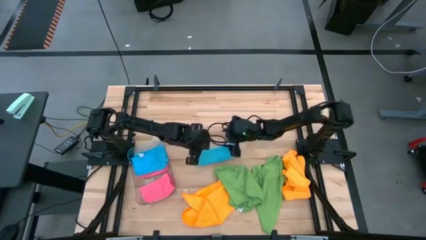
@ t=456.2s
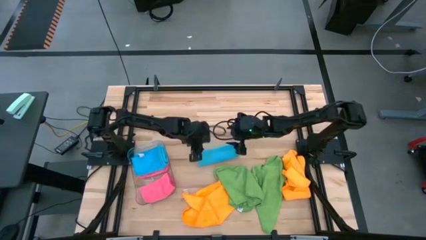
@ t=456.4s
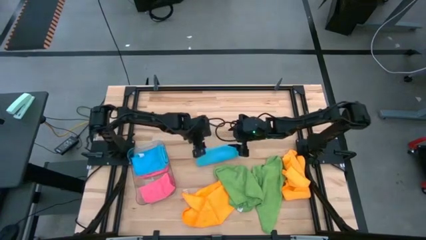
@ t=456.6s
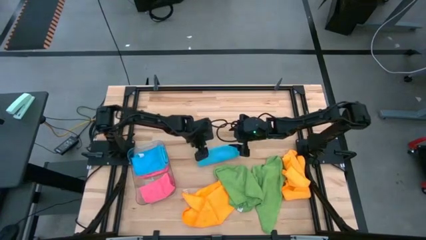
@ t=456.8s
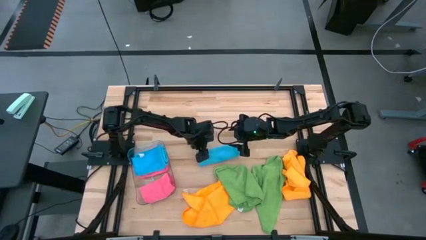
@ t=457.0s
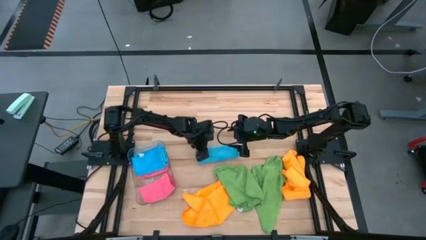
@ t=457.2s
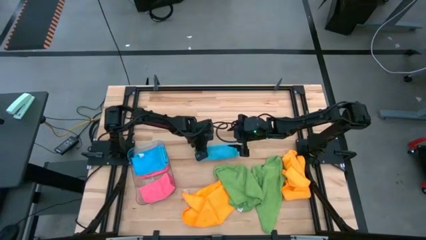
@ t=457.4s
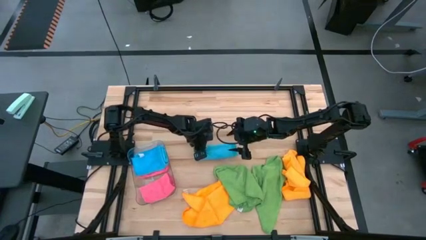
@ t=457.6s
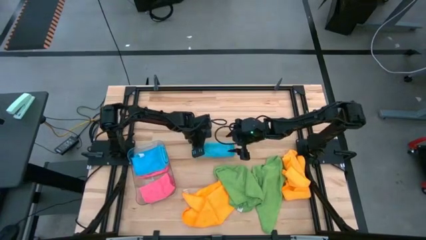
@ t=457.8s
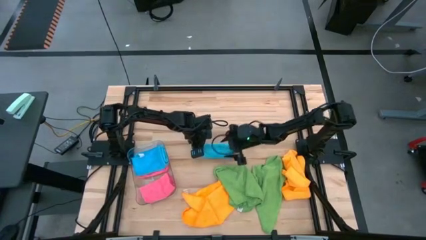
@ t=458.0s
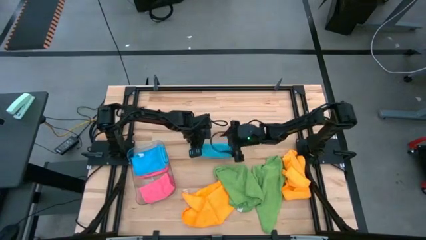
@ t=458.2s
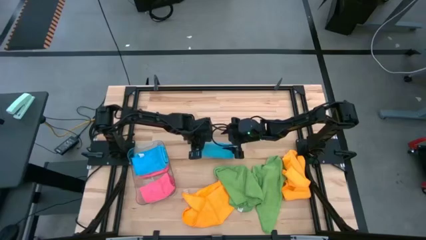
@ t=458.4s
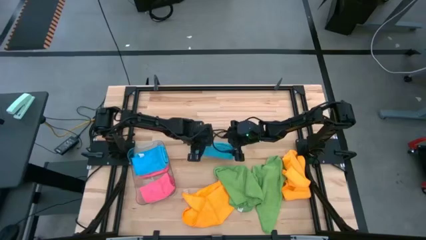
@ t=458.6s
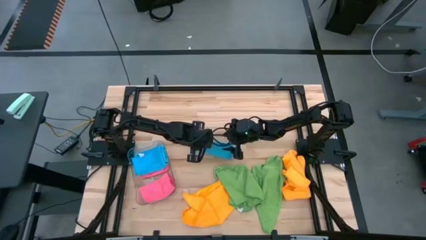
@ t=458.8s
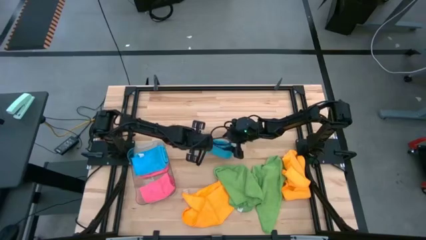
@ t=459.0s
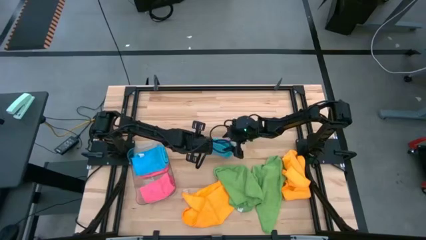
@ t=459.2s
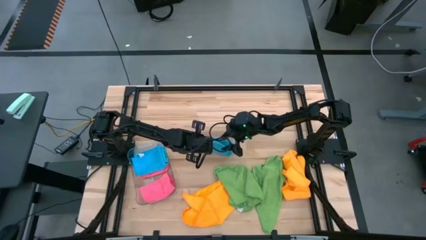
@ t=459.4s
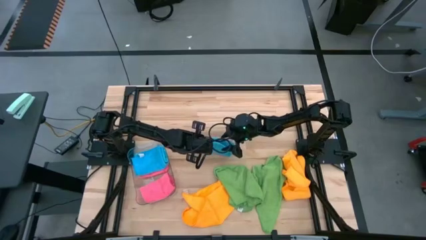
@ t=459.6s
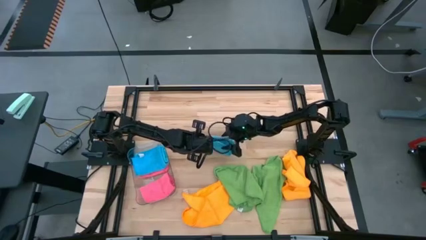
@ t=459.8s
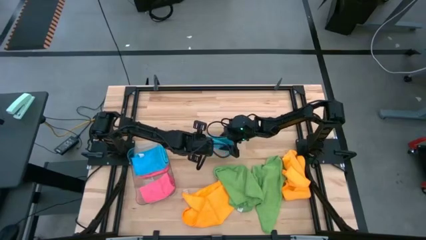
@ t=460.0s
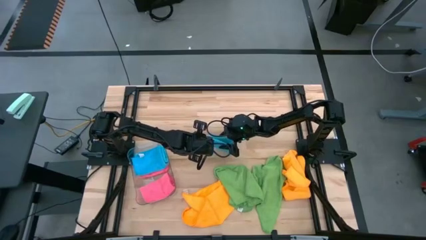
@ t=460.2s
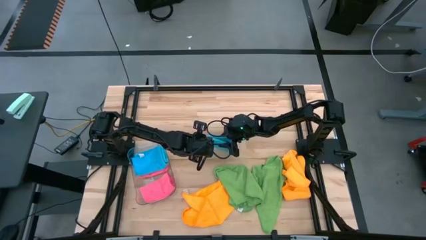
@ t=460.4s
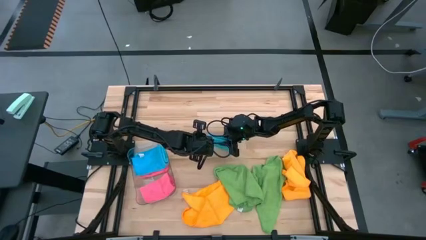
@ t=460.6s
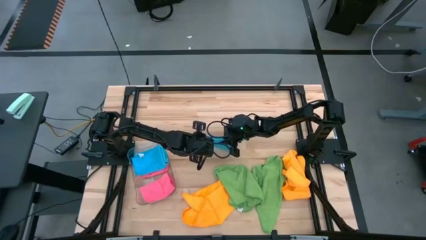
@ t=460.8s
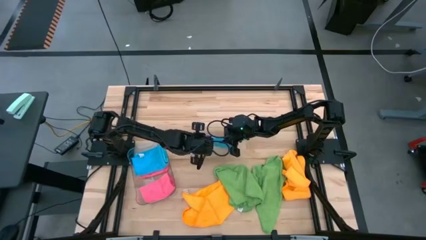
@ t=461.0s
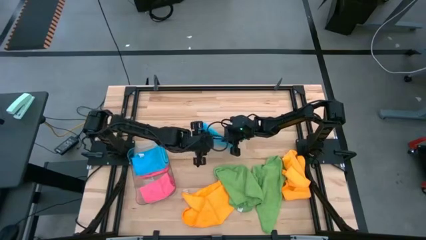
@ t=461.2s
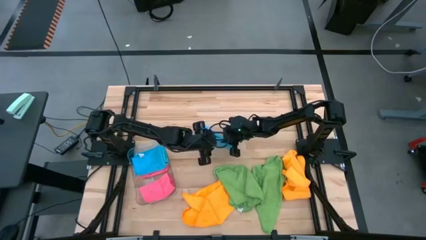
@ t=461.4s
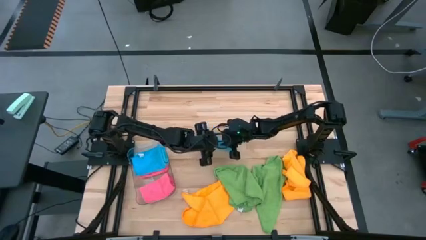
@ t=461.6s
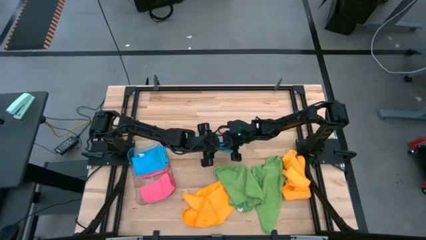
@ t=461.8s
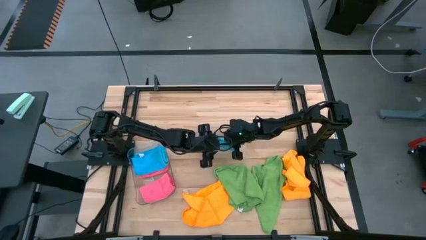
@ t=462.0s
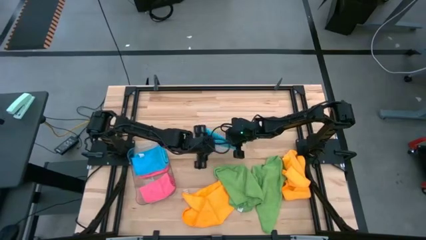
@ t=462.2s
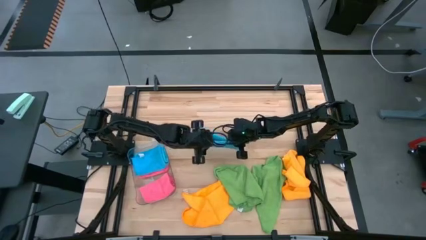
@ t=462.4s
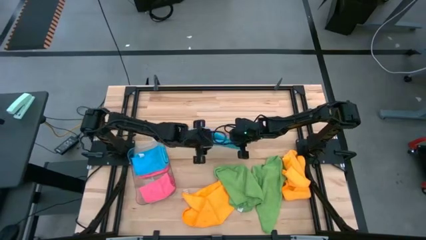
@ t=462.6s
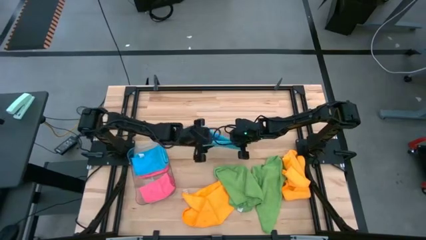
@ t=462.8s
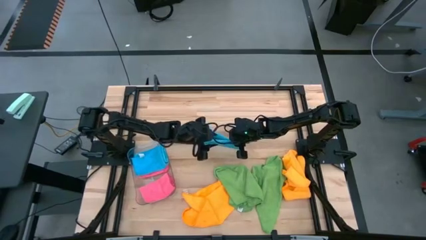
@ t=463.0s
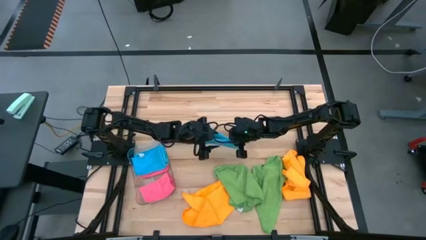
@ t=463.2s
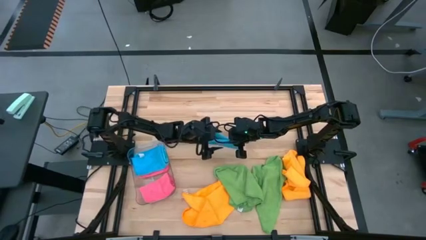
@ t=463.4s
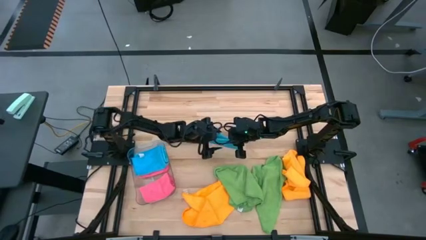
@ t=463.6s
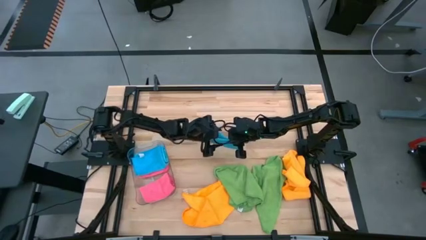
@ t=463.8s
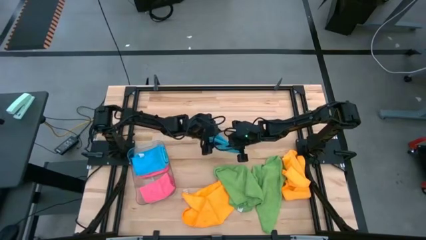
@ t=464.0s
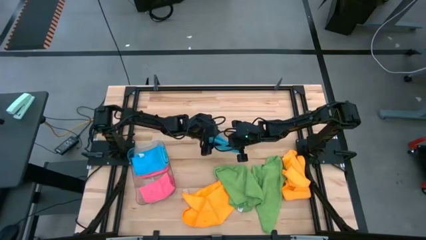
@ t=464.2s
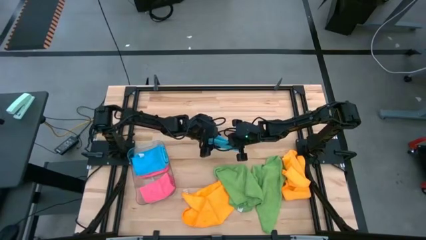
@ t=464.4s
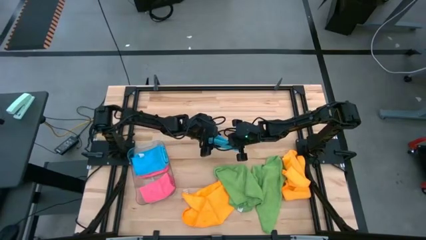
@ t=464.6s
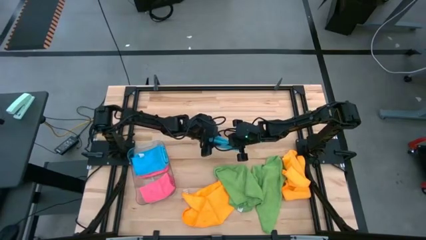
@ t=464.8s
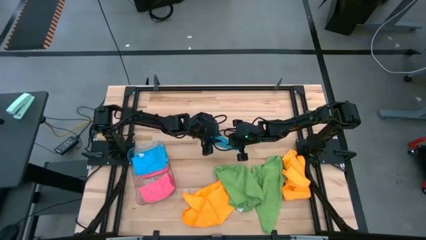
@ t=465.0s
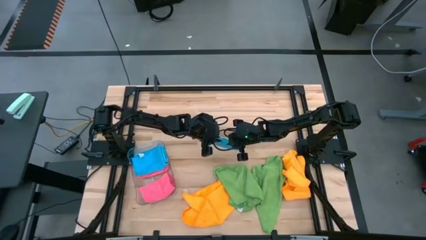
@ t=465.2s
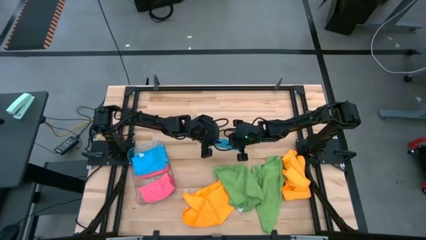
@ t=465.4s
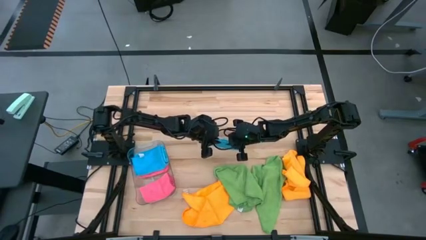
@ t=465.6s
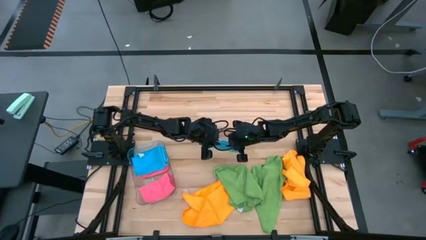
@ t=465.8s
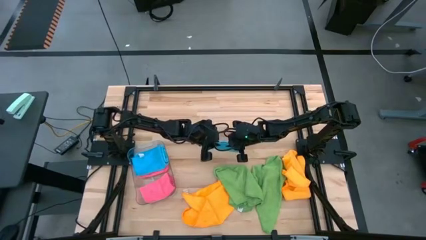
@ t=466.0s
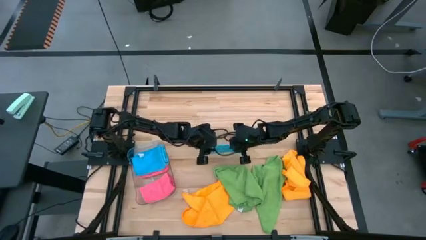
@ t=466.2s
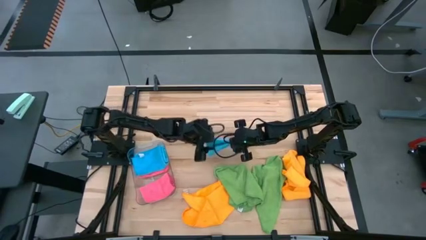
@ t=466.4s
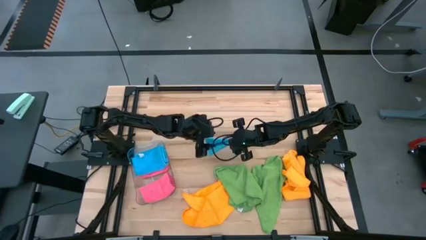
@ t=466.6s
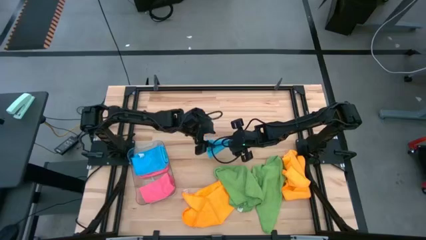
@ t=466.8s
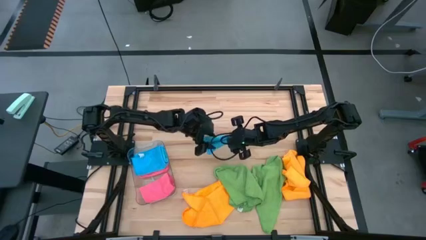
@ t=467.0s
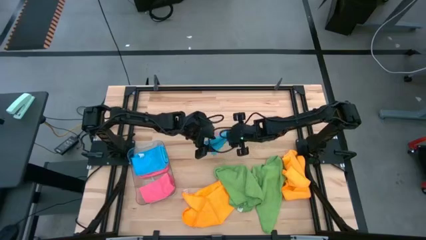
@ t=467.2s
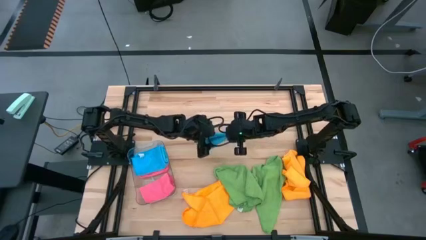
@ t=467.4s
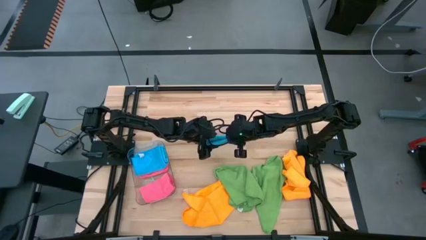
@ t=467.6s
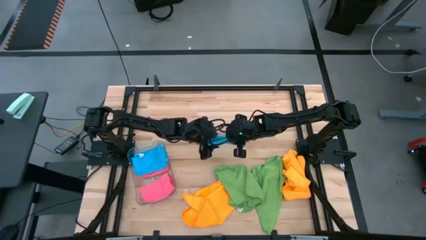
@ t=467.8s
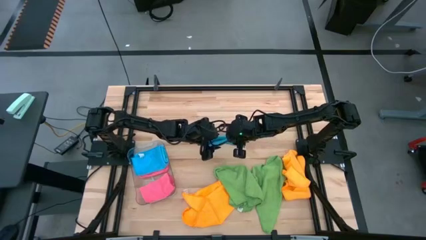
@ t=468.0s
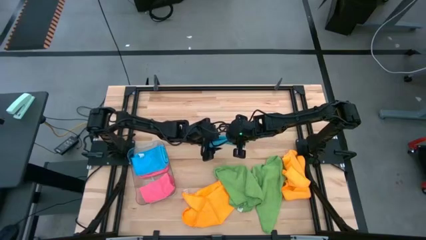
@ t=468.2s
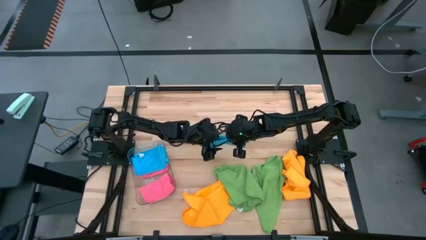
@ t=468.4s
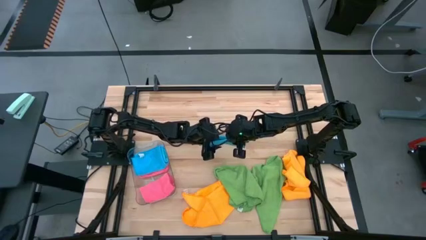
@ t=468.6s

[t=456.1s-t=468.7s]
Task: Fold microfiber towels
Put the blue microfiber cloth into the transparent bin

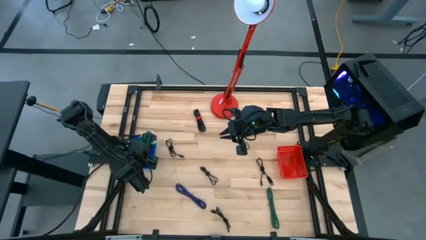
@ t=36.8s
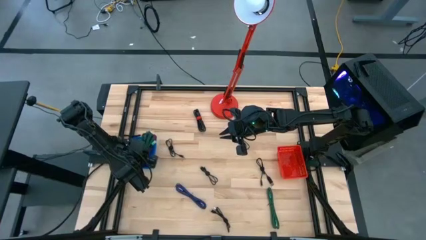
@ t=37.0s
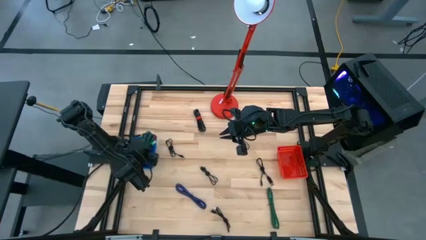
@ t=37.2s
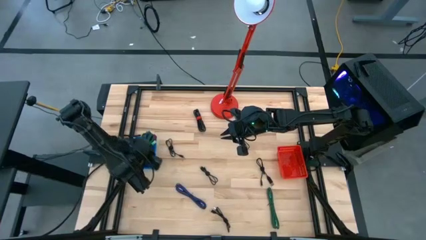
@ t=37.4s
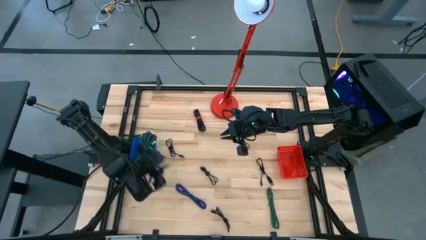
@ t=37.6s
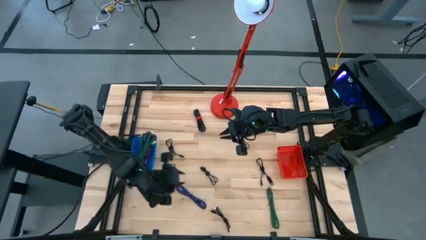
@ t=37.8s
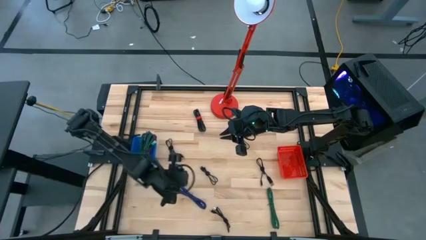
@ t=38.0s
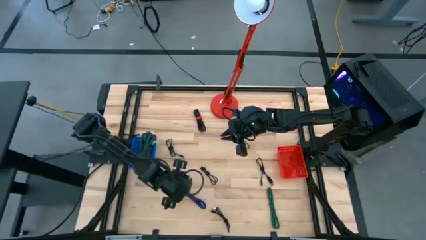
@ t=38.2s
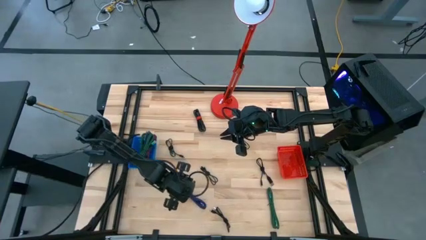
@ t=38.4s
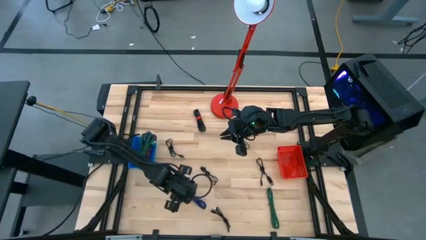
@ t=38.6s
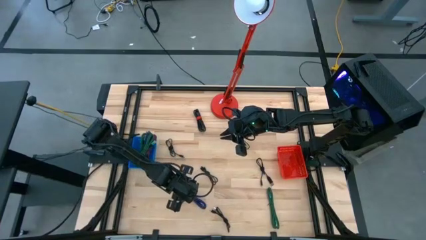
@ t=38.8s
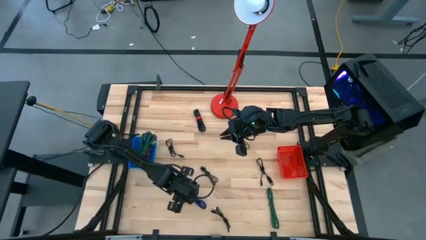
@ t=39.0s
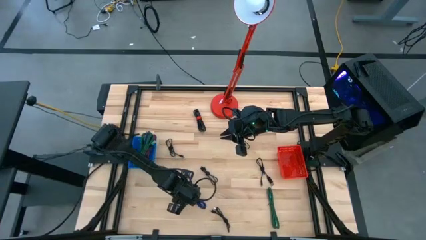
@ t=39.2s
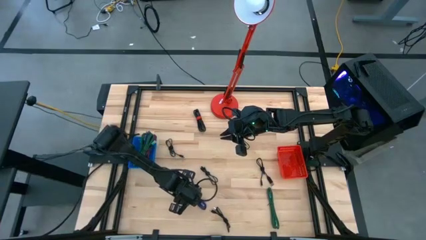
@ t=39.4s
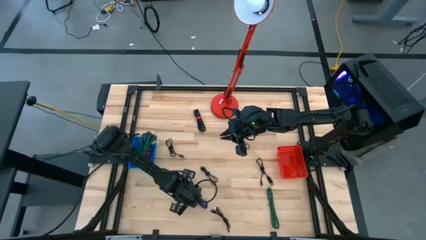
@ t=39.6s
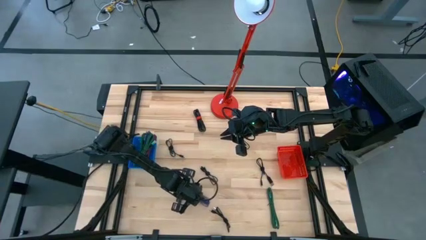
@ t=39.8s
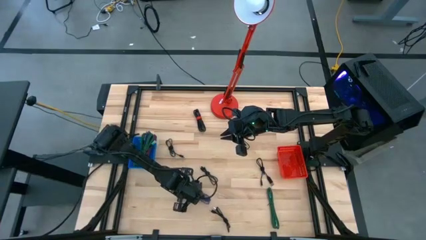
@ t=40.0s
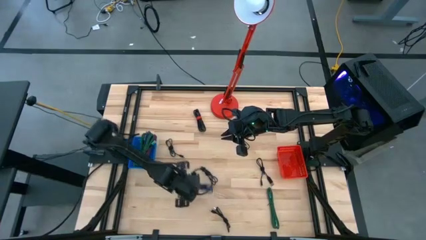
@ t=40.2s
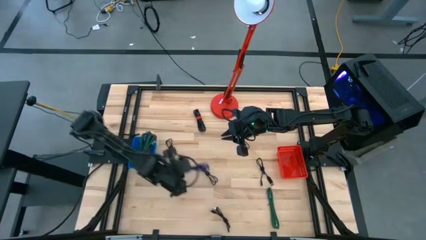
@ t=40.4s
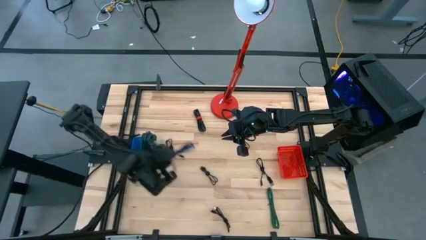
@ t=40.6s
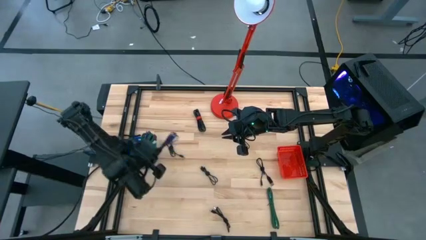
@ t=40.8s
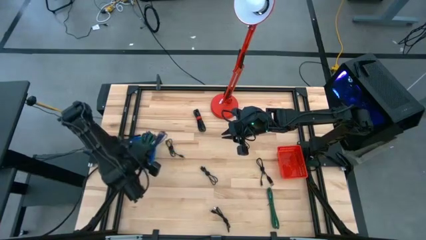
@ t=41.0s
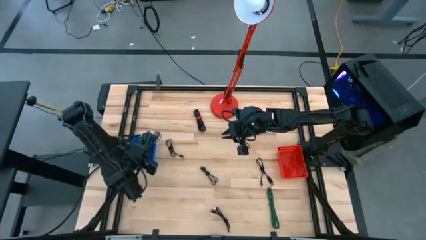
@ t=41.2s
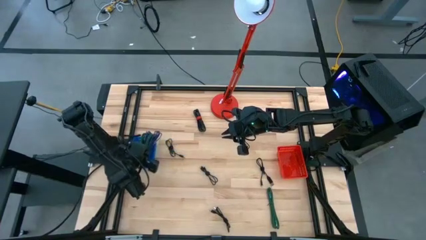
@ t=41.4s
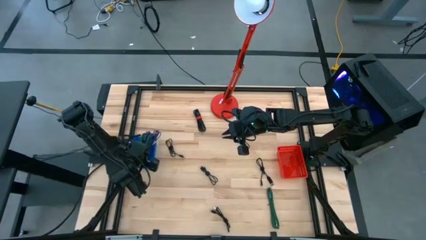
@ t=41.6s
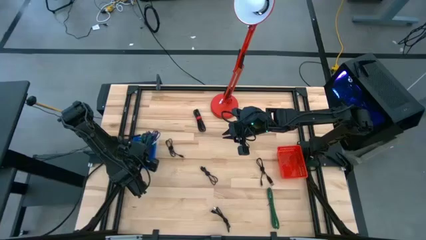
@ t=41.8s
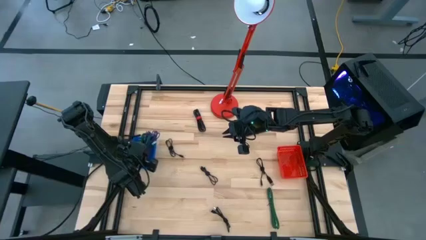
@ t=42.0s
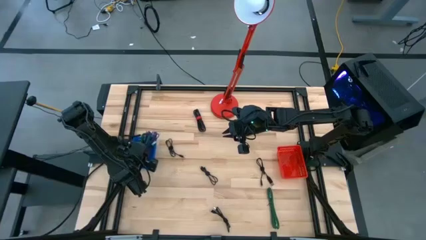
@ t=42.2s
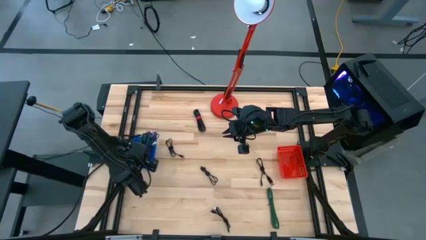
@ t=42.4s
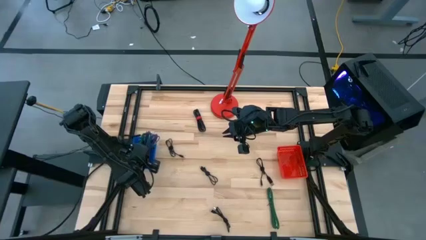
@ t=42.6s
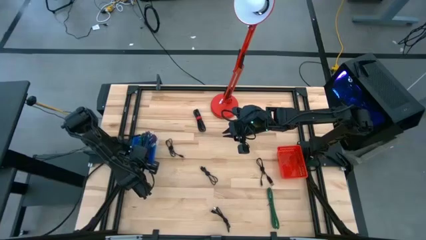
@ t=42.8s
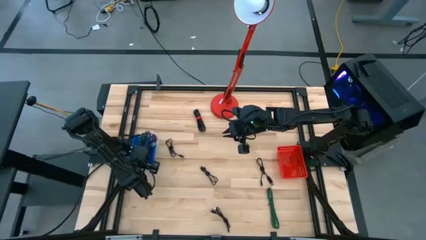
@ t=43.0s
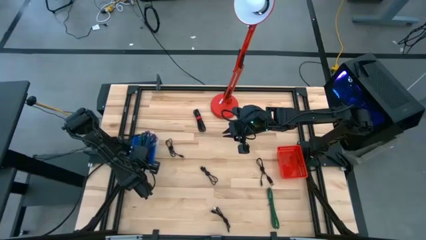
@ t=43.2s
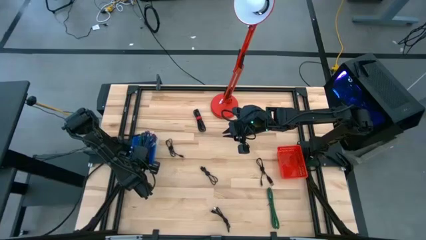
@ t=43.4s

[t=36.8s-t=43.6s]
Task: Pick & Place USB Port
Put the blue and black charger cable into the blue bin
